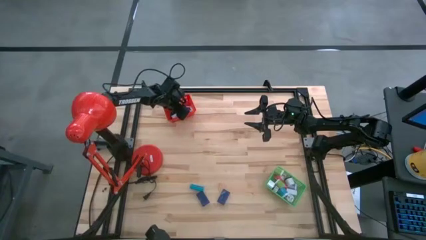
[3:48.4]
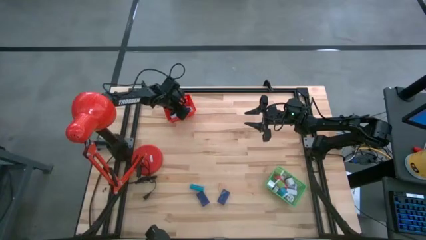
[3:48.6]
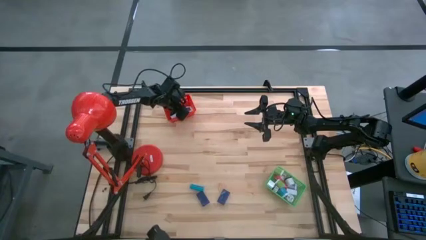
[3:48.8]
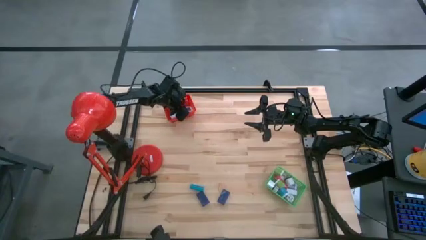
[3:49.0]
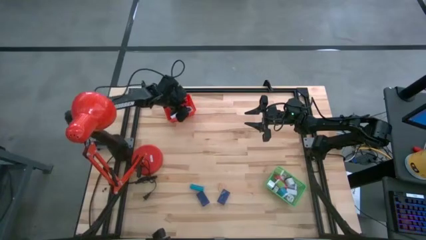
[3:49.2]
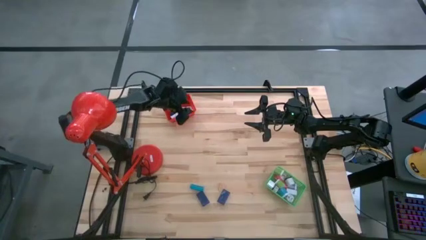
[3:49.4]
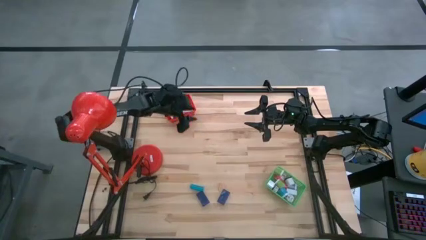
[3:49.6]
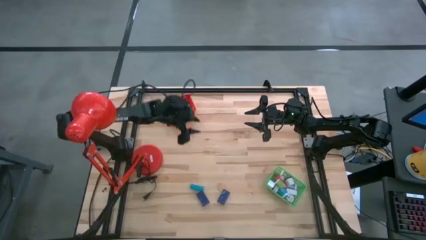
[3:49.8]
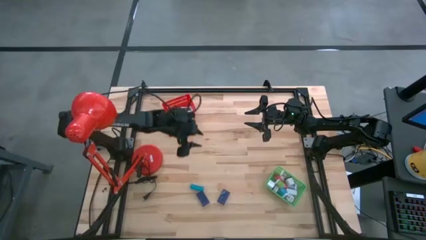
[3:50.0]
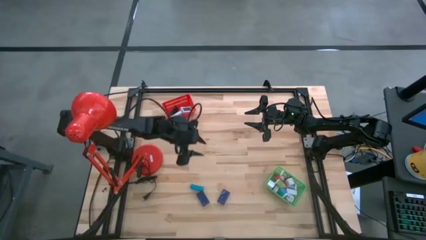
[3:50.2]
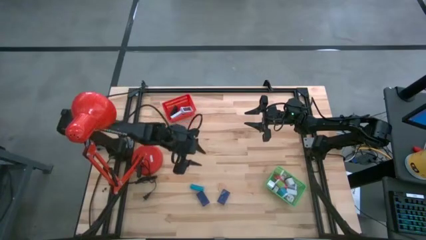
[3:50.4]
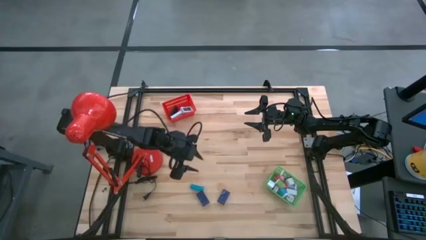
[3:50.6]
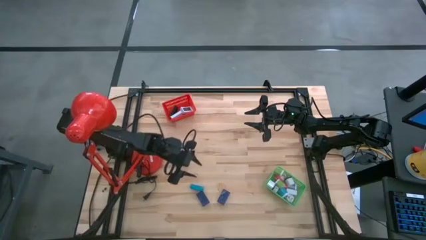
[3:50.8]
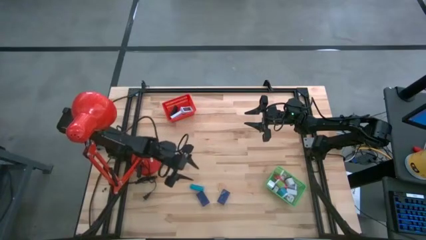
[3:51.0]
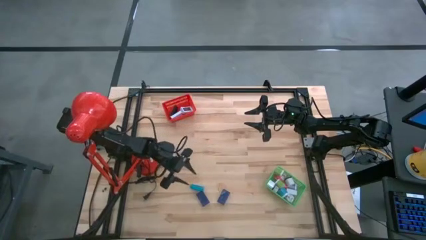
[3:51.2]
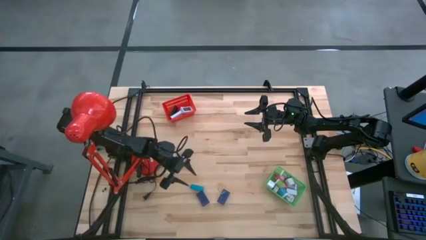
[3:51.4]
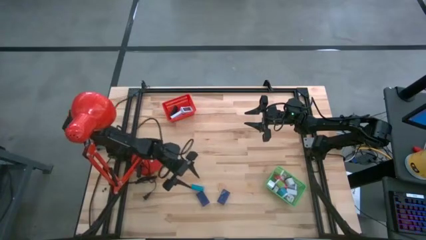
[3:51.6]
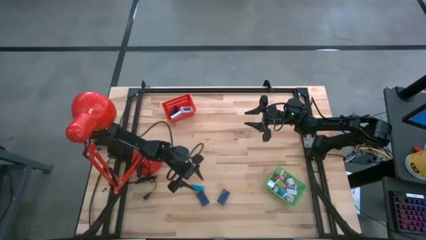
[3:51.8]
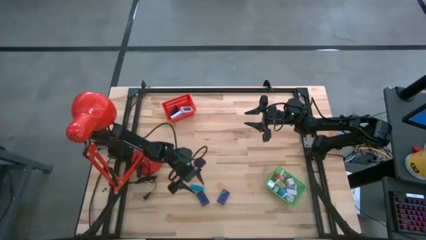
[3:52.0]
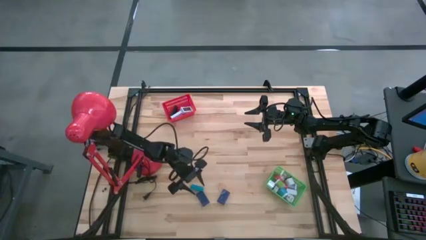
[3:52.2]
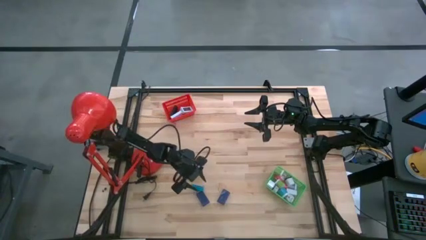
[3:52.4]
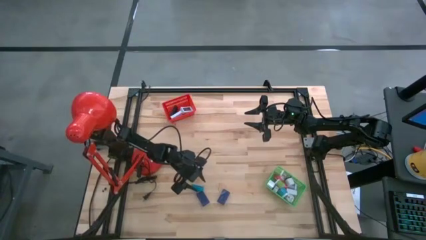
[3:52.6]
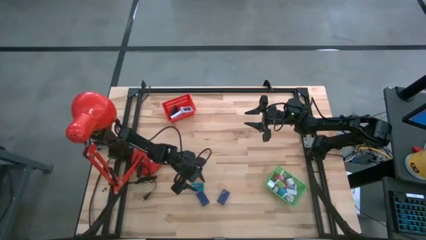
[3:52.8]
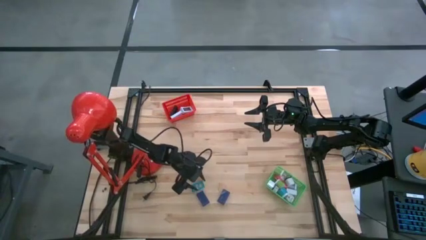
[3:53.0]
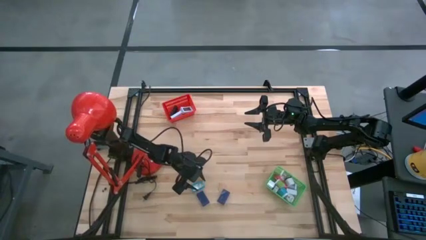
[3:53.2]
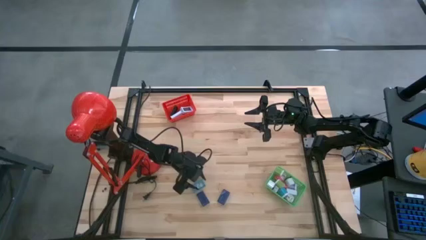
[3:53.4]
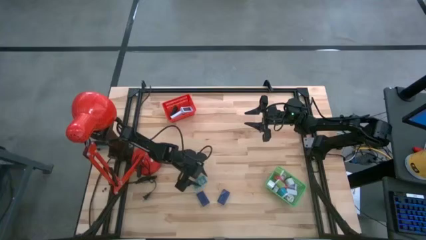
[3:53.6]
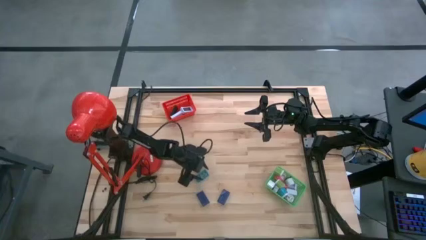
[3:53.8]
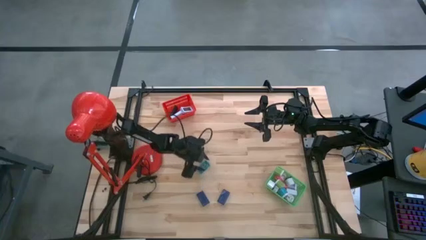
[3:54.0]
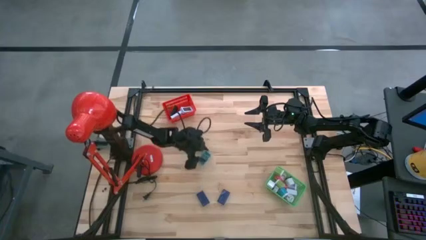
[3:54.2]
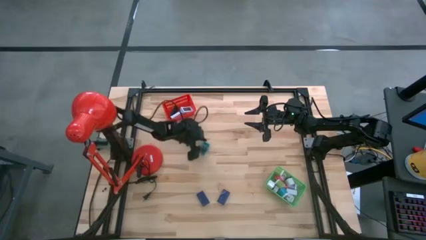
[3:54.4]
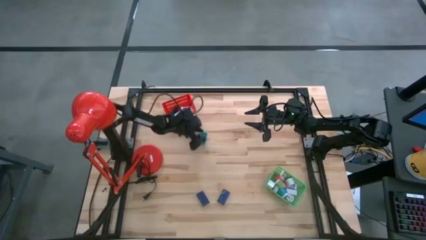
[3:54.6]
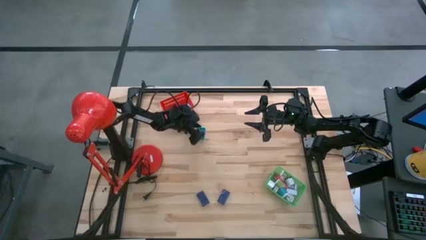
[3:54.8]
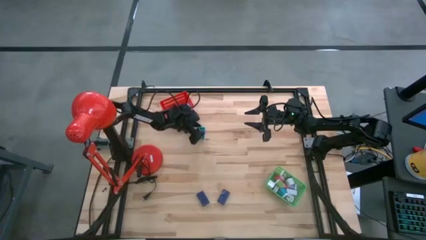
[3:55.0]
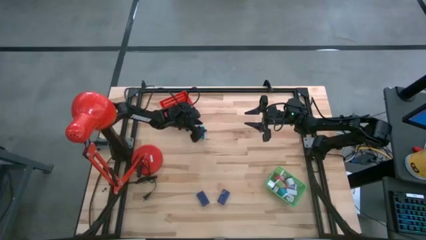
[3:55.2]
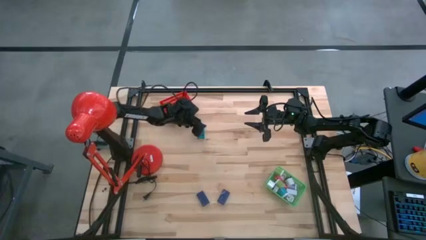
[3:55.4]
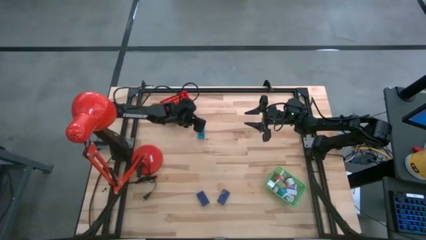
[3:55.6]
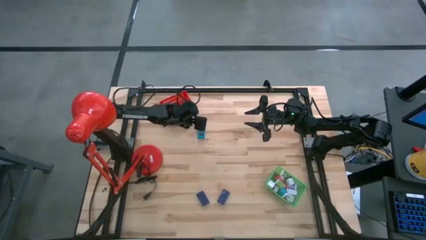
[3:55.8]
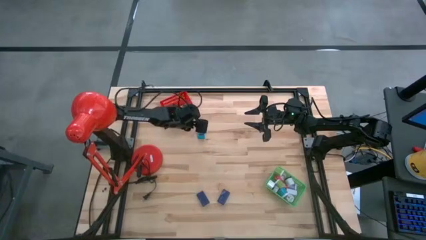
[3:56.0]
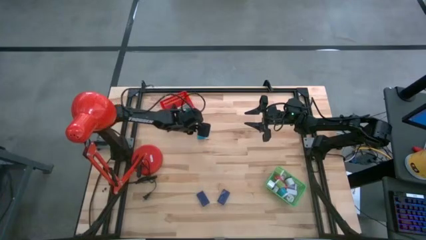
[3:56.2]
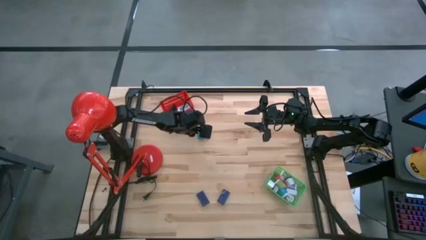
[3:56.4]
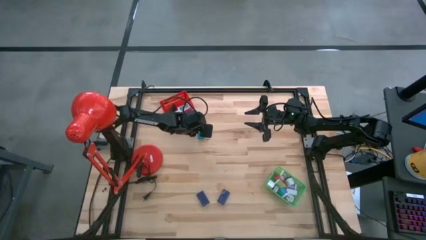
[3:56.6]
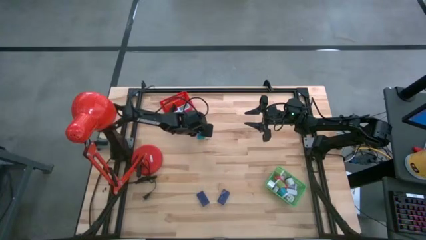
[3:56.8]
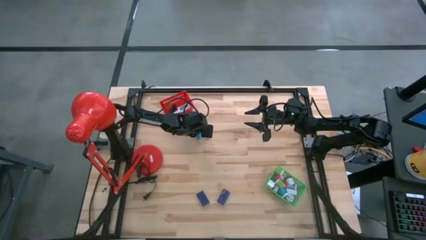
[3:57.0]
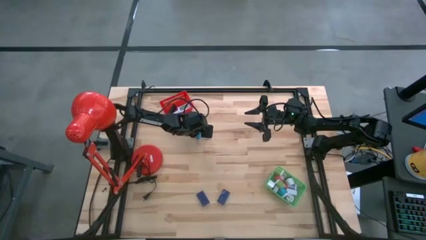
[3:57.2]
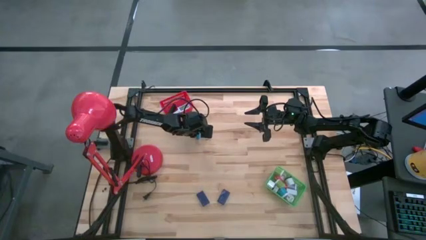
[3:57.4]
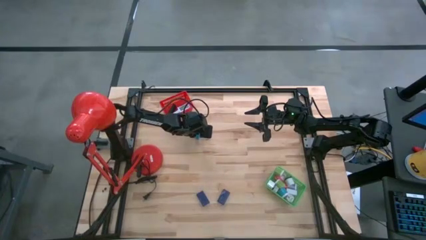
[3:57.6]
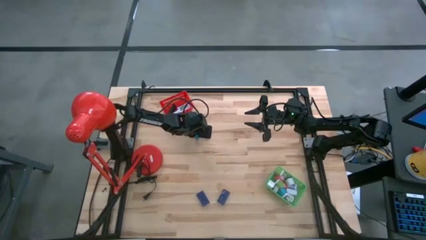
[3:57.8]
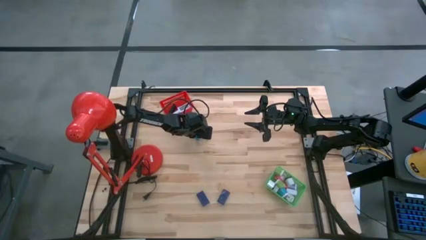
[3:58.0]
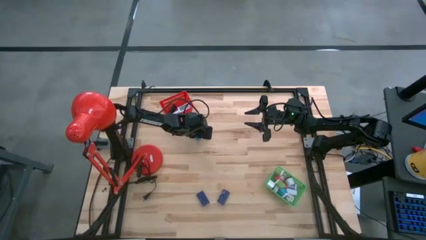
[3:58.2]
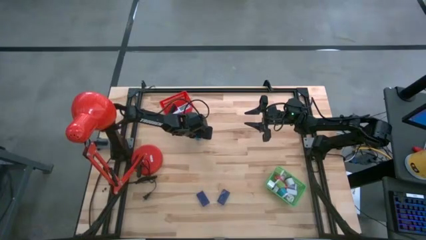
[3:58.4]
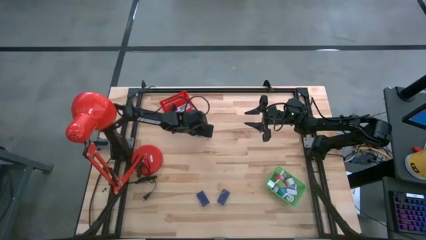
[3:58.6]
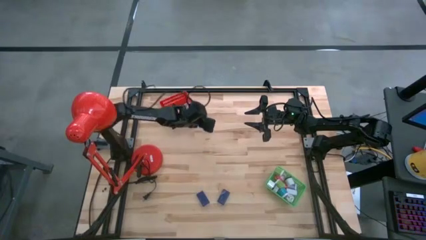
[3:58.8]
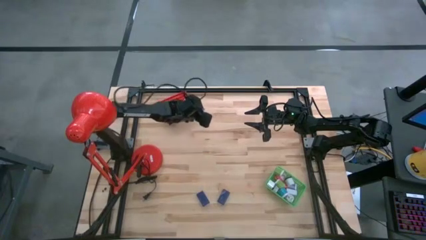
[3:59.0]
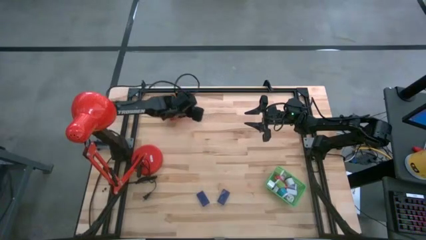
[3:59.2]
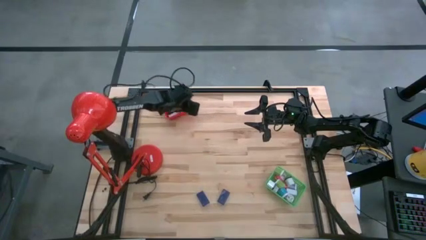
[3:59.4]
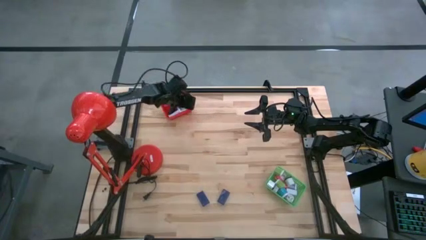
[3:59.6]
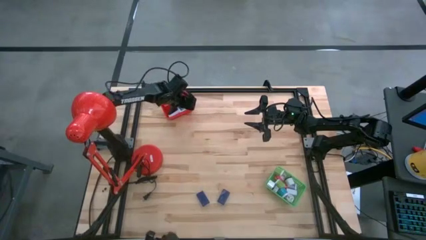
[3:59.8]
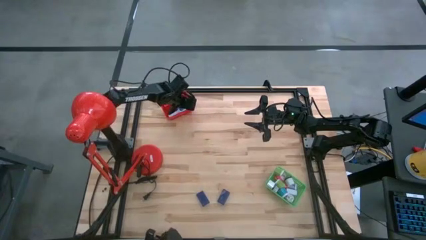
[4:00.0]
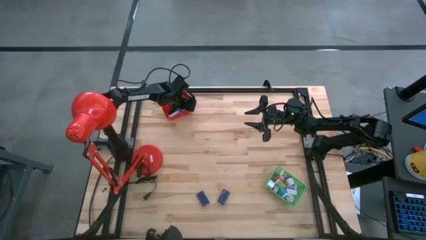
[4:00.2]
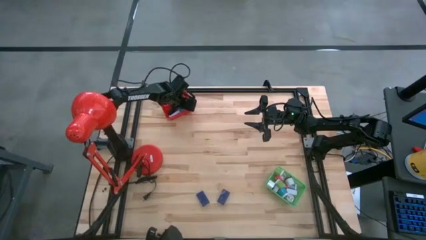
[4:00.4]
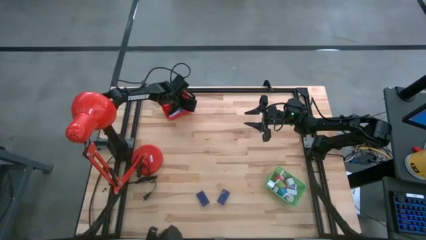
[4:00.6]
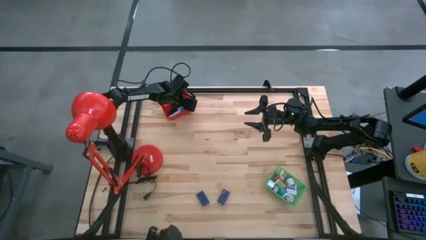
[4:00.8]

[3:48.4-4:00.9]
Task: Pick & Place Office items
Put the light blue digital clock into the red bin

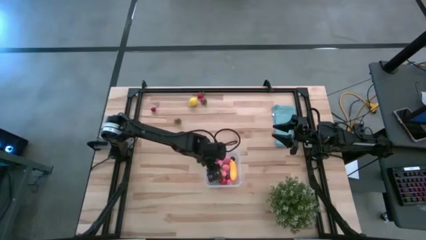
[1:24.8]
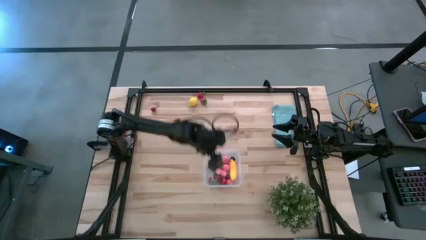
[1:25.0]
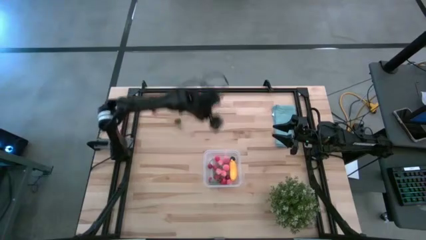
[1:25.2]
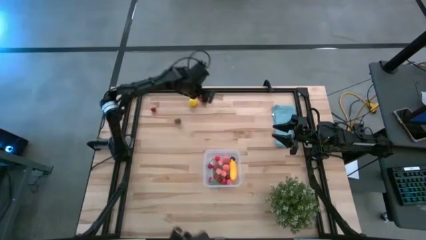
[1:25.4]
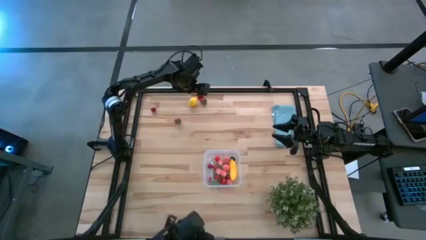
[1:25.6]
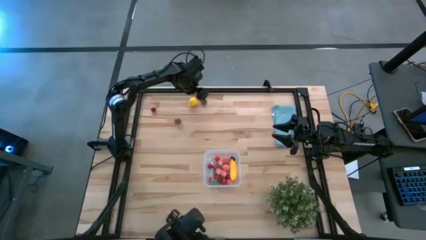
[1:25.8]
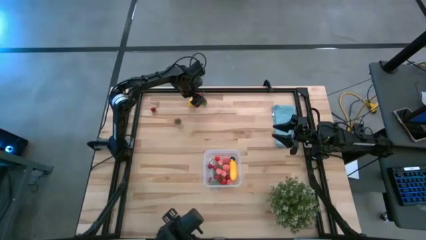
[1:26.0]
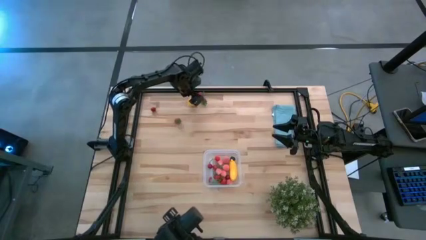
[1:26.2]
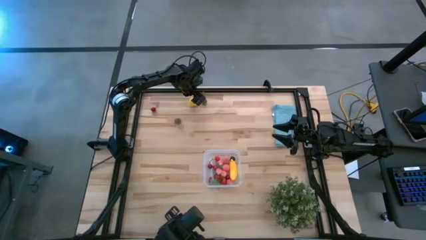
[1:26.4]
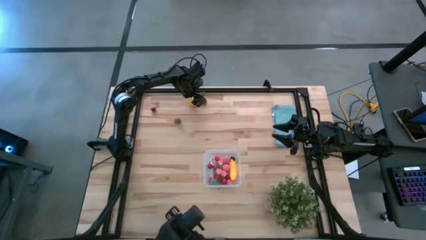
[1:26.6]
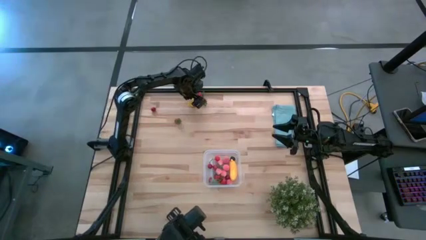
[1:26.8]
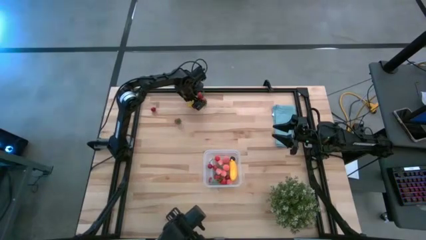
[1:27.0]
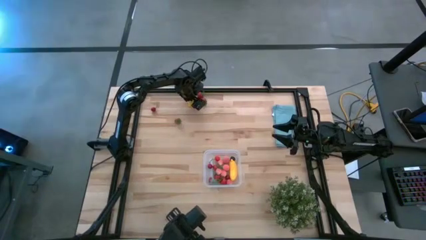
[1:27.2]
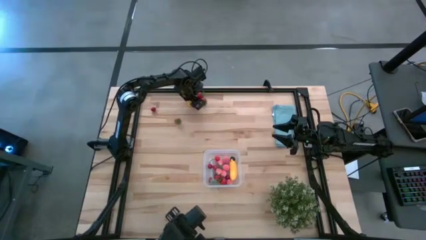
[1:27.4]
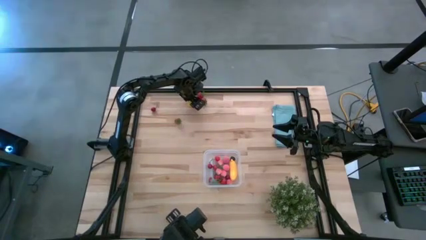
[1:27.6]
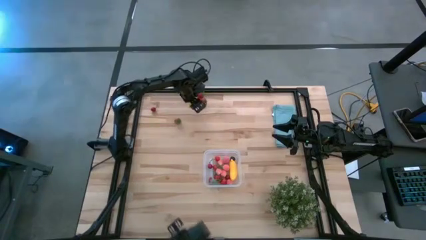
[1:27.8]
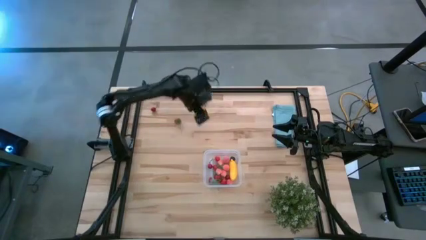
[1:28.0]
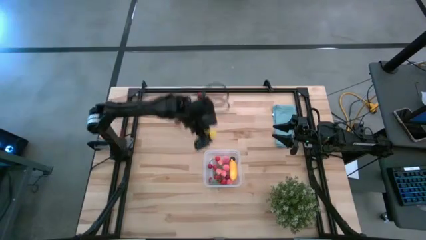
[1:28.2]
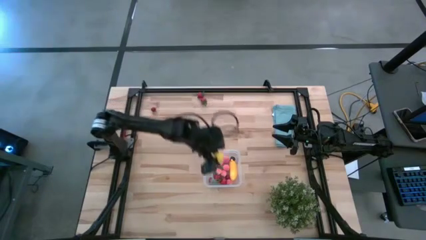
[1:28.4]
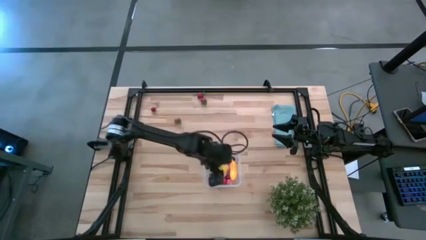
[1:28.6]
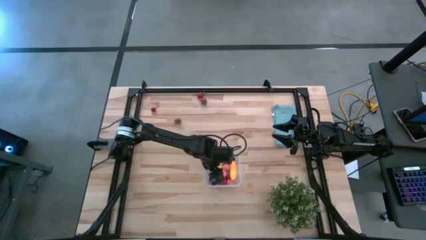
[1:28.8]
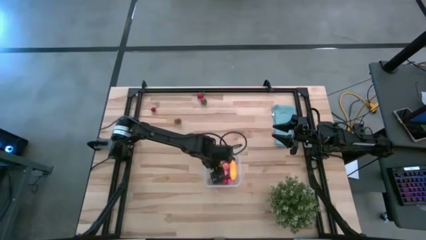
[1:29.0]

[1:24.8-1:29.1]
Task: Pick and placing Produce into tupperware
Put the yellow lemon into the transparent bin
